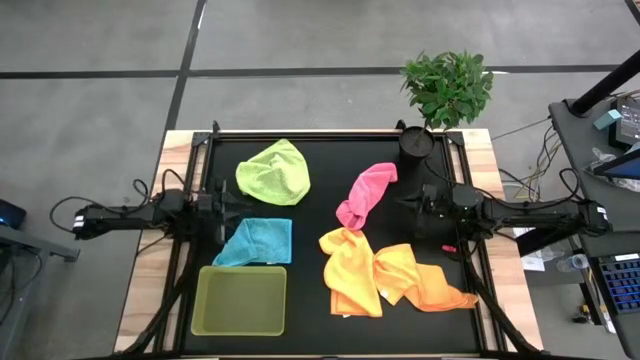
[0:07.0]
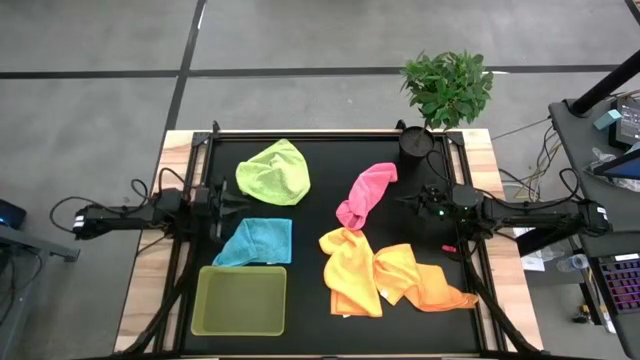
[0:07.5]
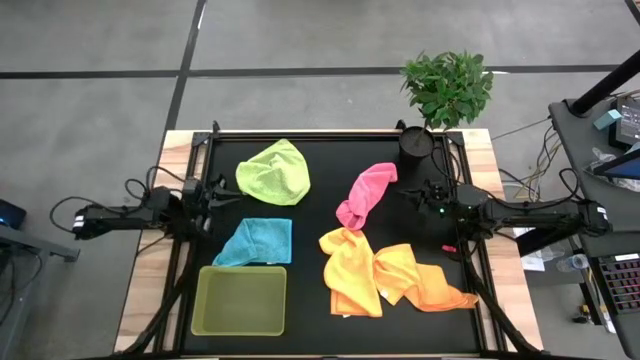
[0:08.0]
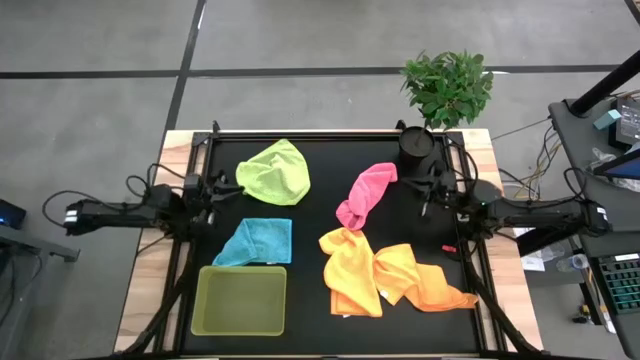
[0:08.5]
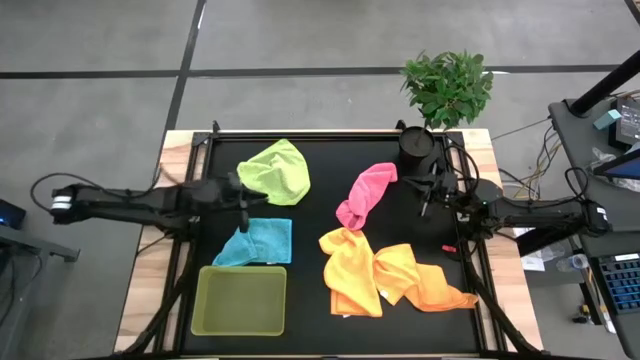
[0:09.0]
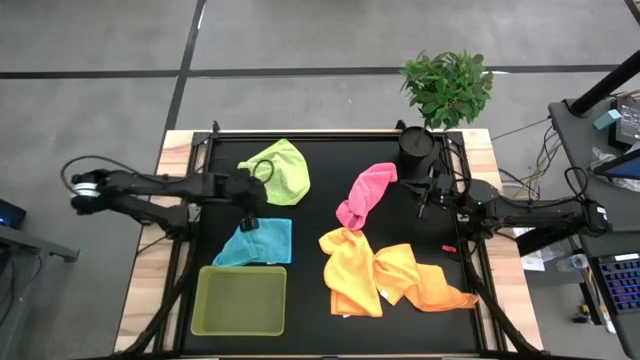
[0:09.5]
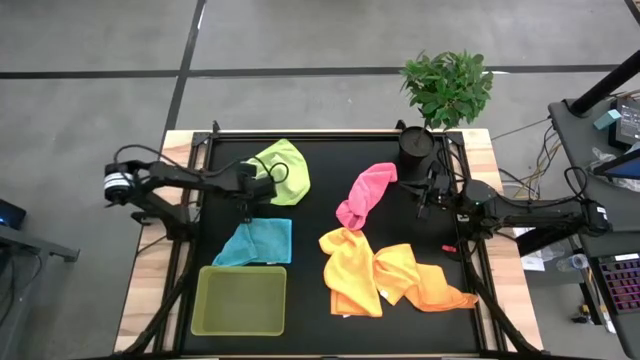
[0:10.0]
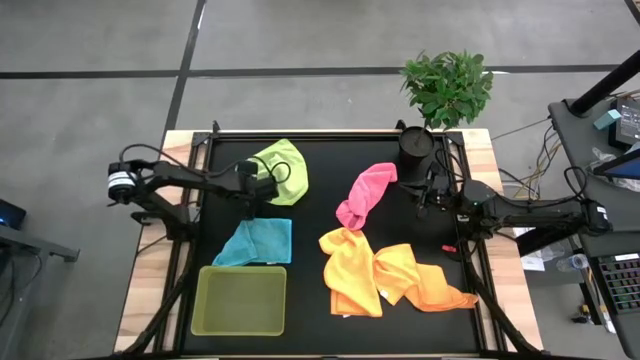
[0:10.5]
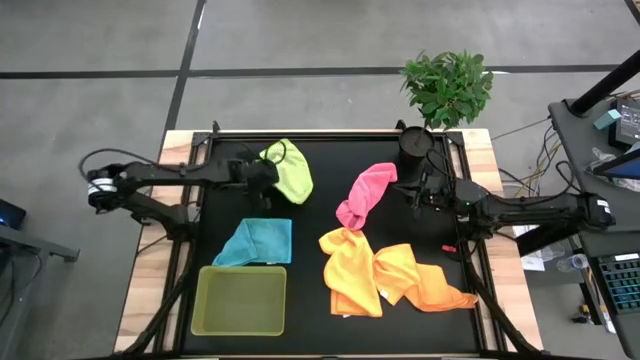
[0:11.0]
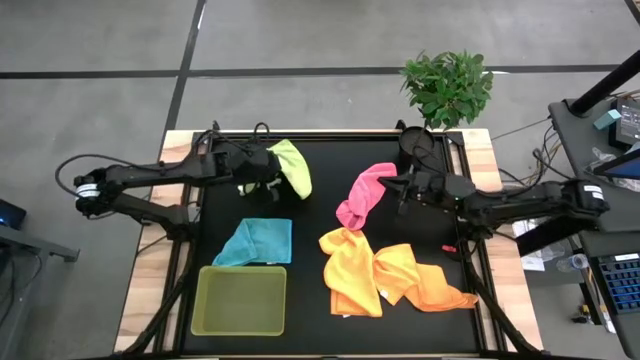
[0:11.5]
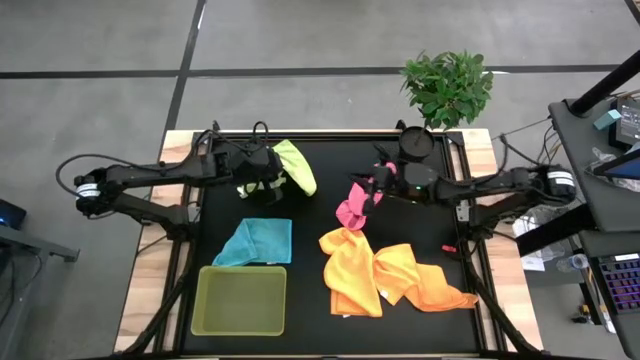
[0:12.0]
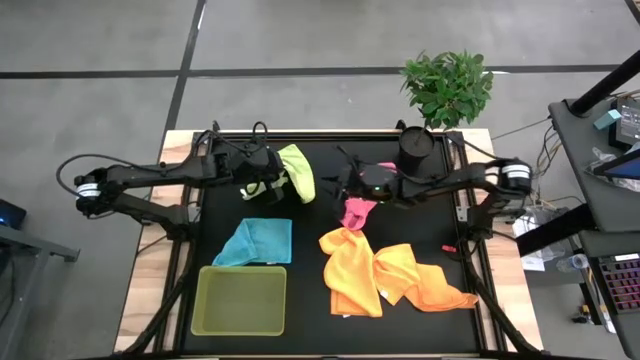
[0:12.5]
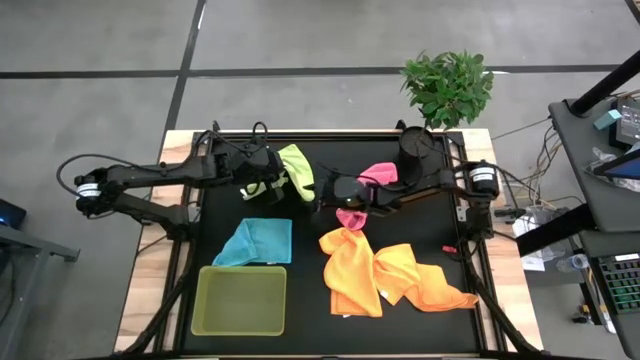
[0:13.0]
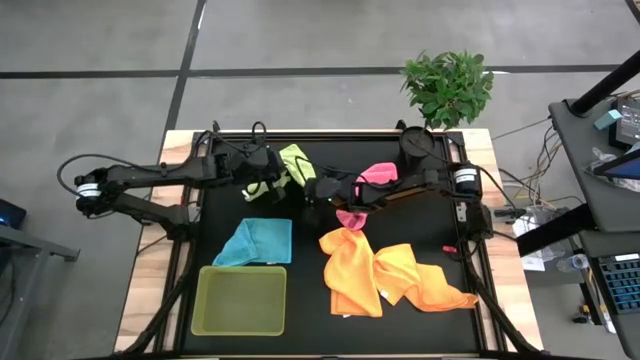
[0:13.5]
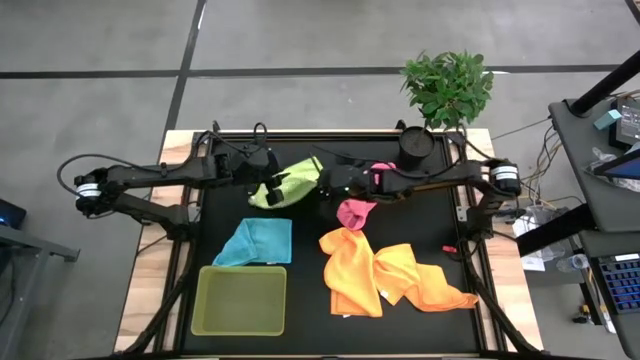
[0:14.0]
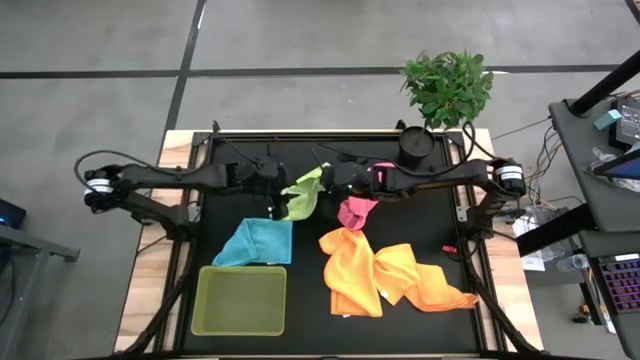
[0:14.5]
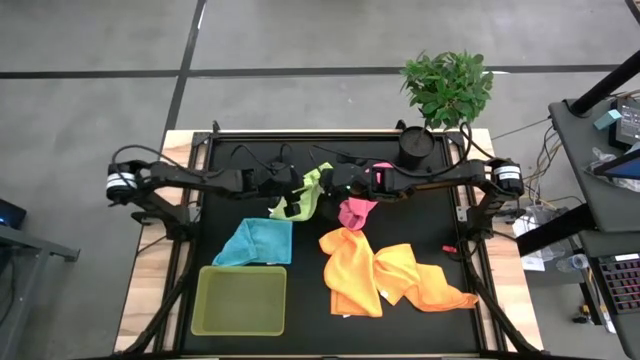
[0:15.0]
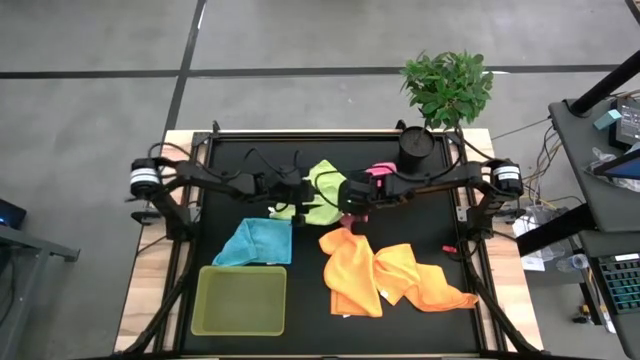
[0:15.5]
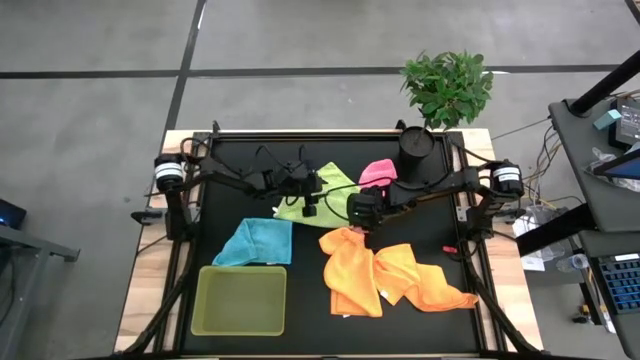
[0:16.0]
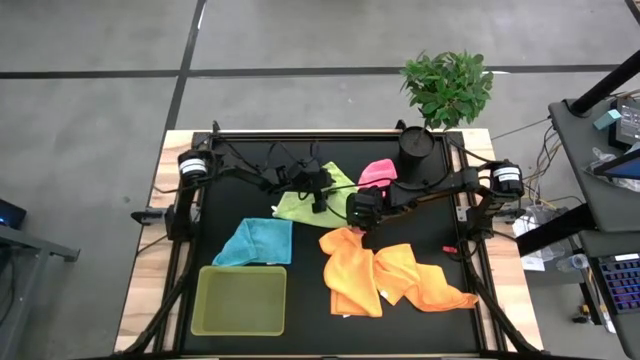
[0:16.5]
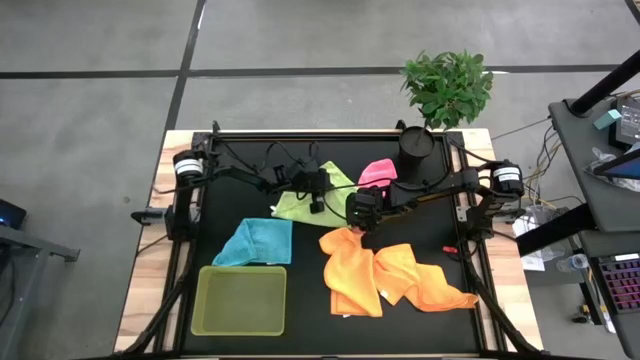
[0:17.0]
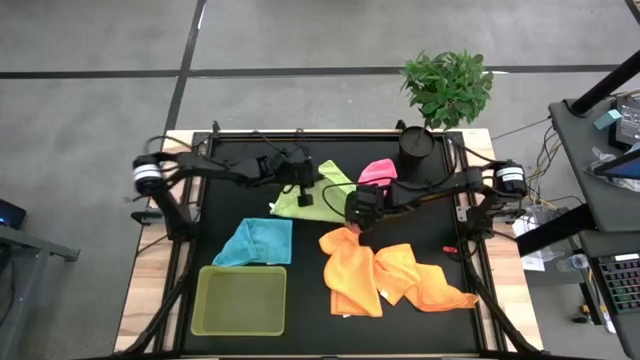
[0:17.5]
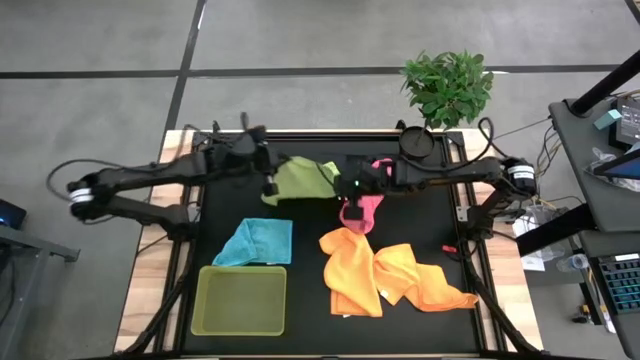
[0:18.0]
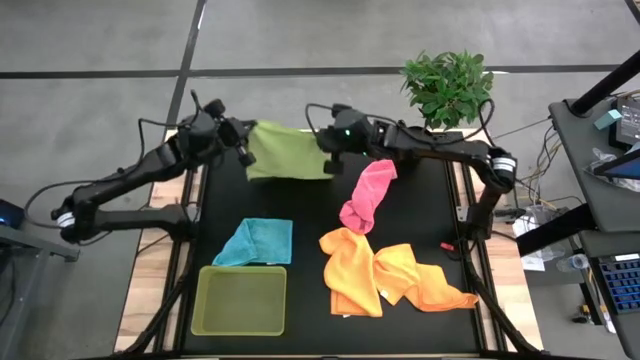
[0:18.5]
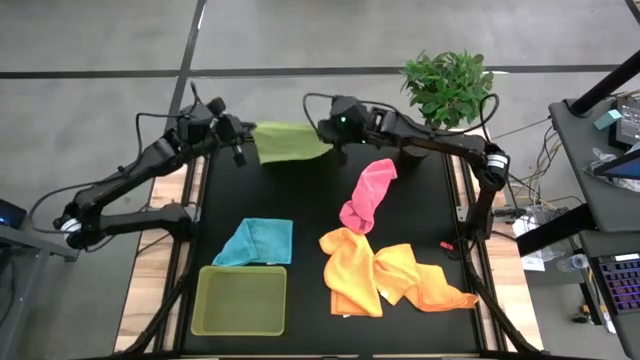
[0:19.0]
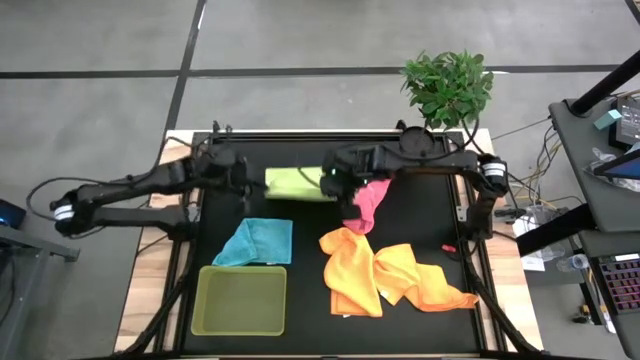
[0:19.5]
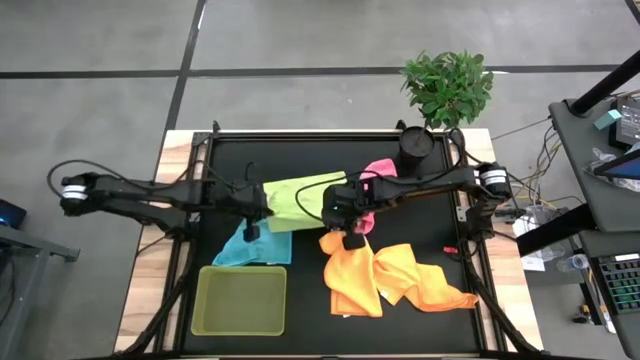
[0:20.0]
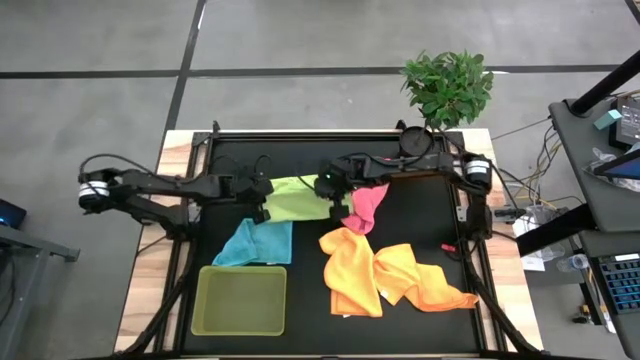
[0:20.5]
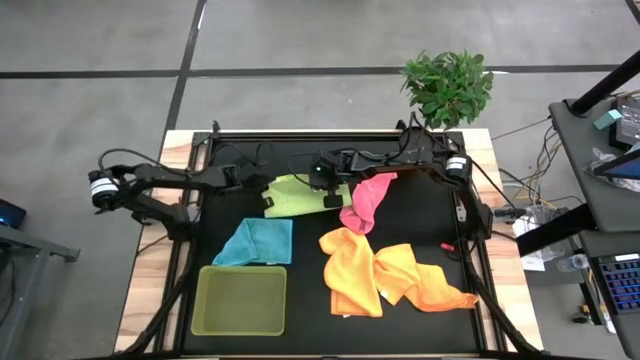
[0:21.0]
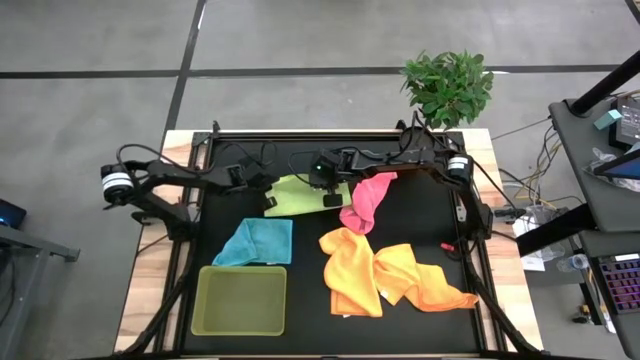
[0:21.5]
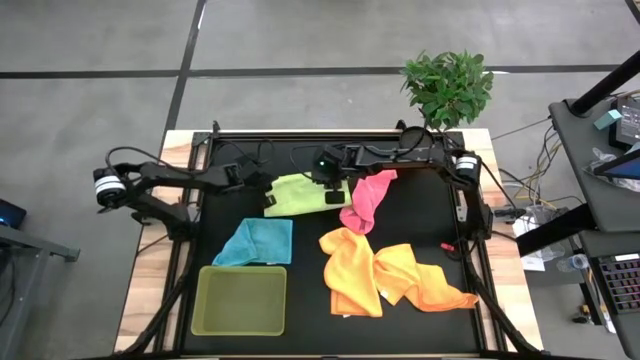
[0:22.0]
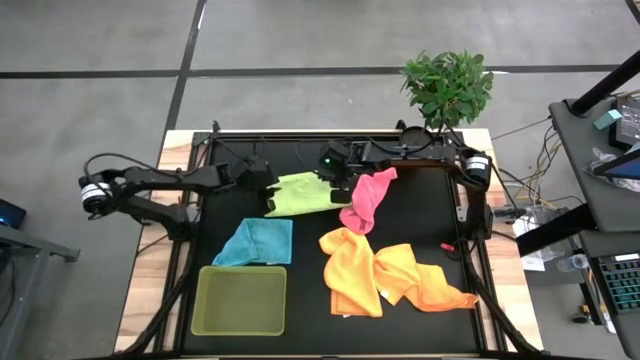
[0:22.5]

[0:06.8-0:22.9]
Task: Fold microfiber towels
Fold the green microfiber towel

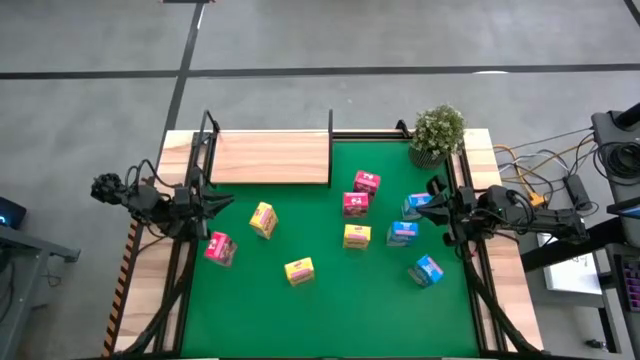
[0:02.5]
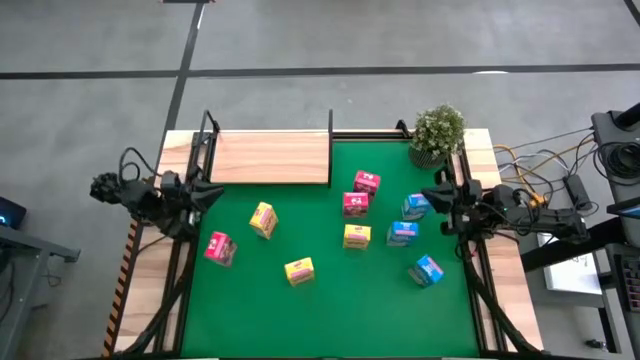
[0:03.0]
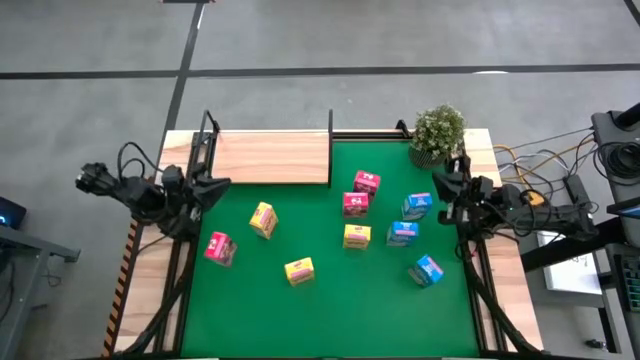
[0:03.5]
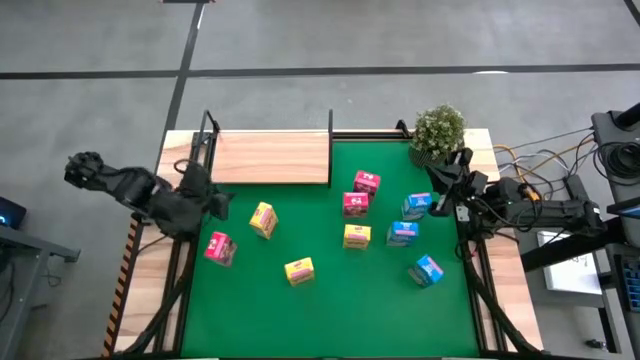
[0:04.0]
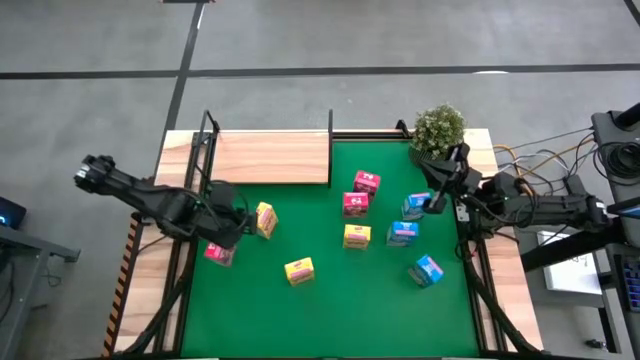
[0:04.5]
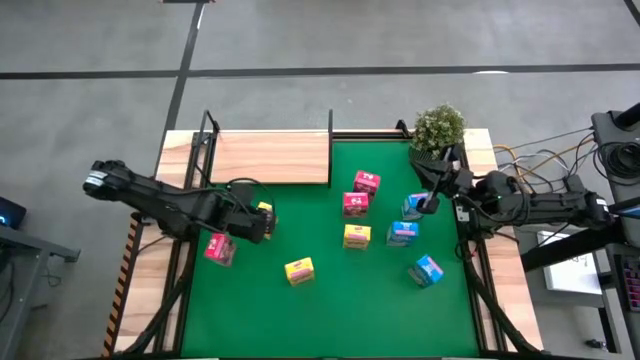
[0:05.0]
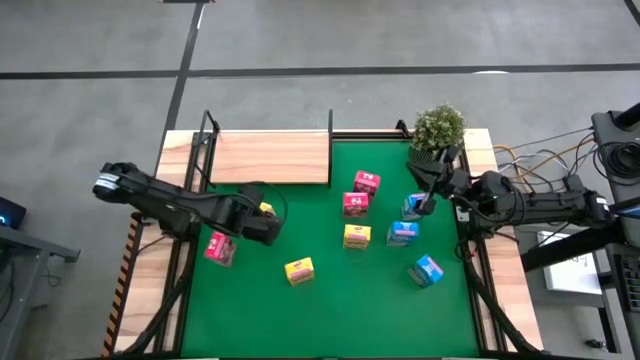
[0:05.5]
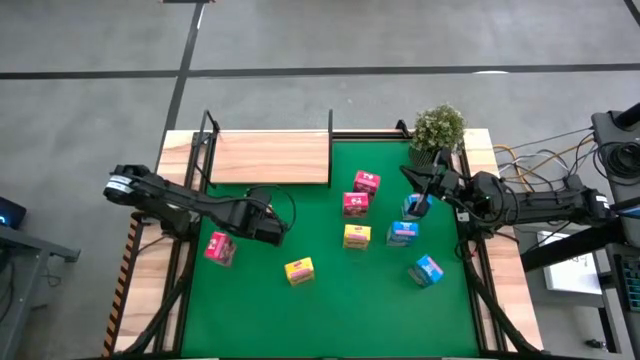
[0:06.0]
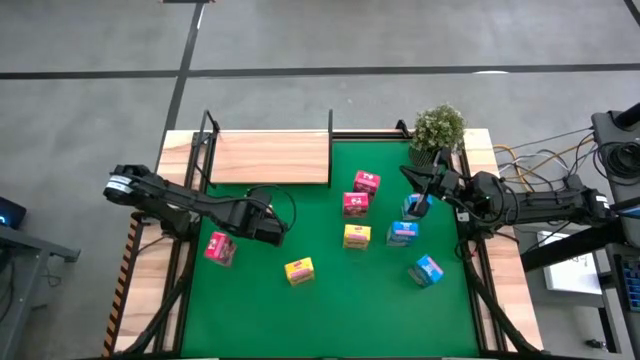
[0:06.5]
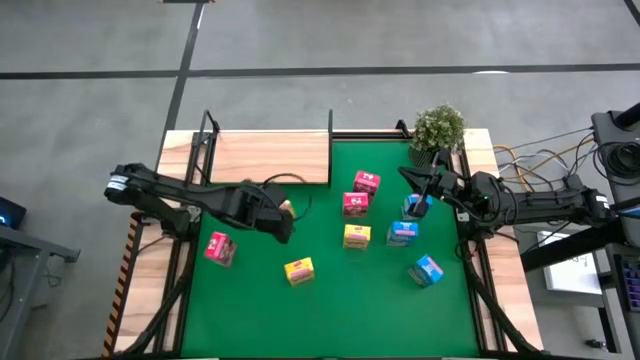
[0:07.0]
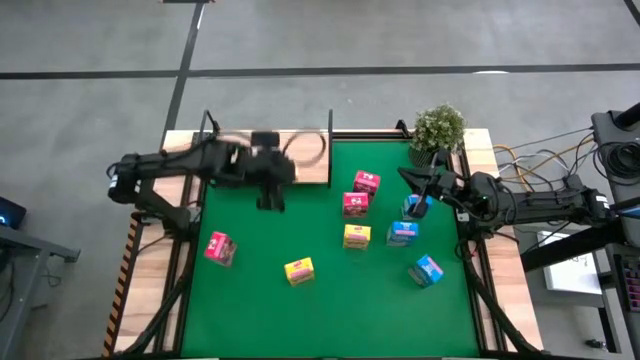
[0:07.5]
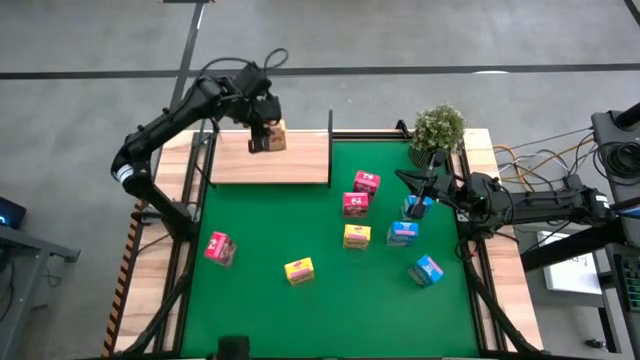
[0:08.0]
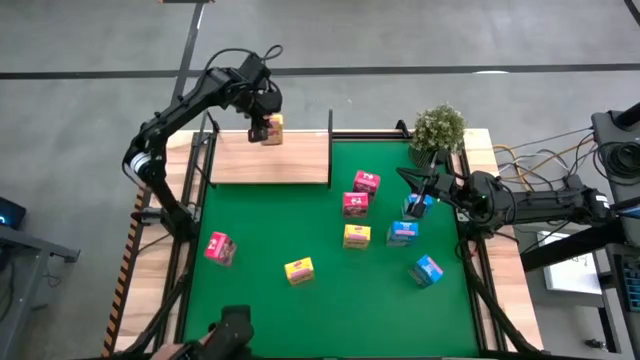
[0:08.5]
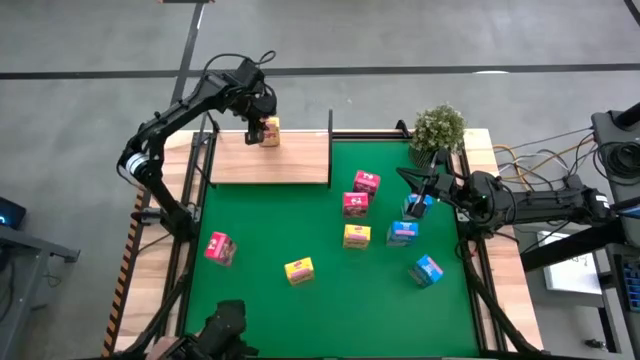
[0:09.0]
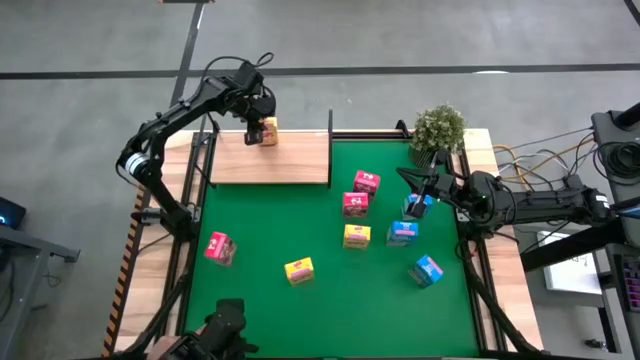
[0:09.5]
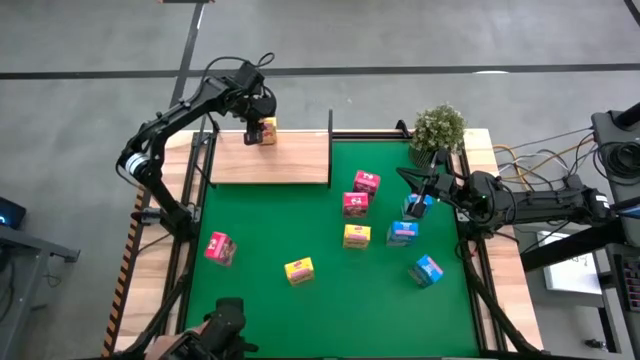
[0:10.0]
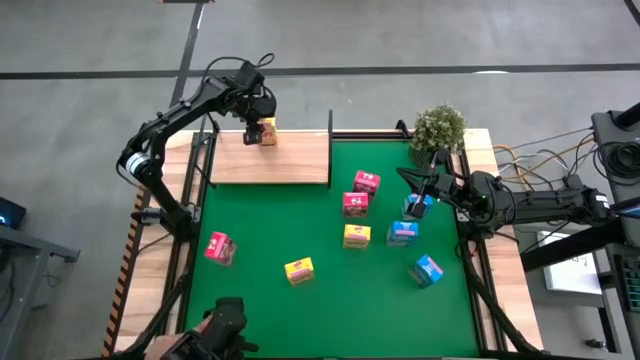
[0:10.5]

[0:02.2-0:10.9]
Task: Stack cereal on shelf
Put the top yellow cereal box on the shelf
